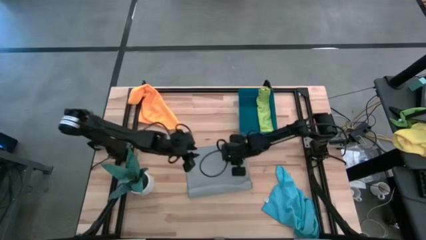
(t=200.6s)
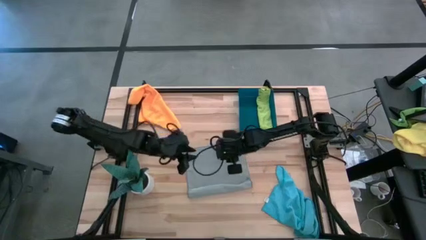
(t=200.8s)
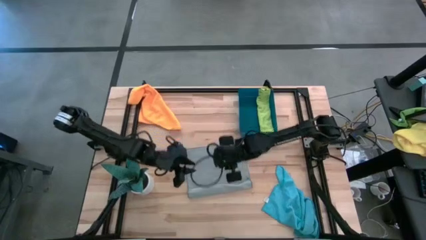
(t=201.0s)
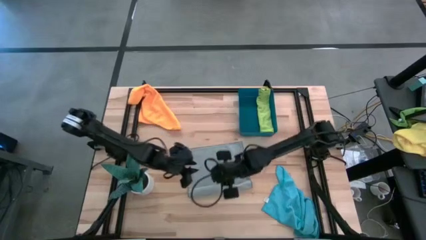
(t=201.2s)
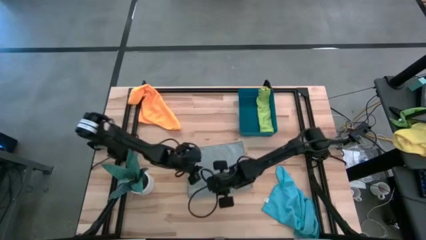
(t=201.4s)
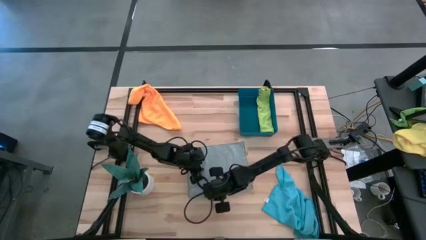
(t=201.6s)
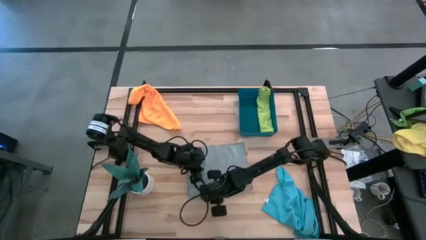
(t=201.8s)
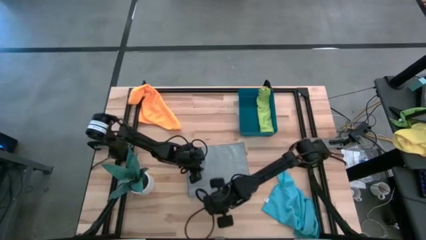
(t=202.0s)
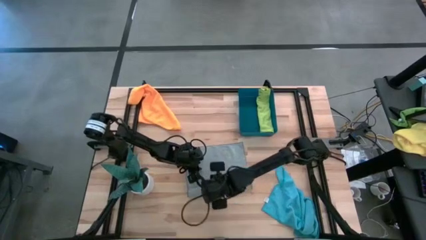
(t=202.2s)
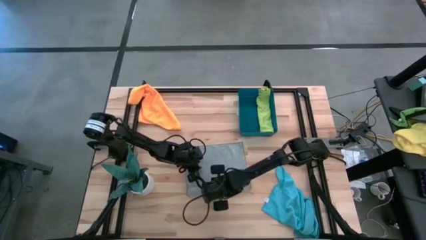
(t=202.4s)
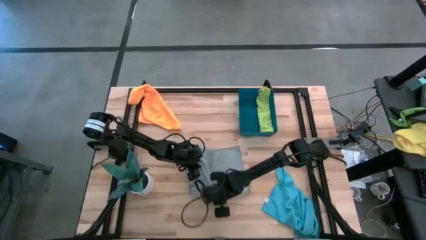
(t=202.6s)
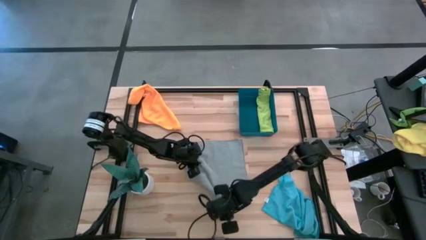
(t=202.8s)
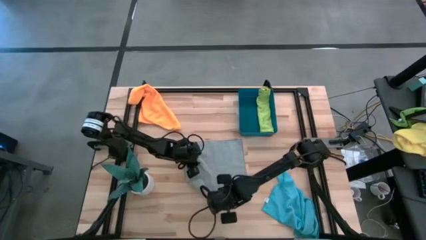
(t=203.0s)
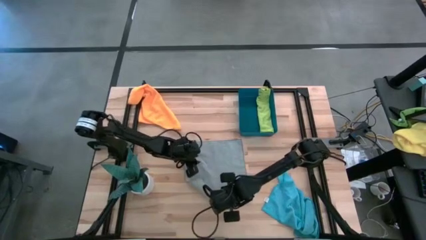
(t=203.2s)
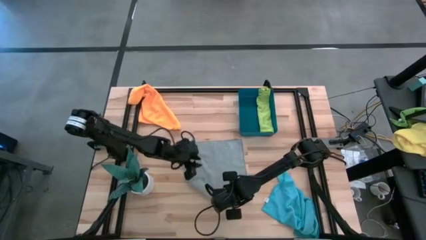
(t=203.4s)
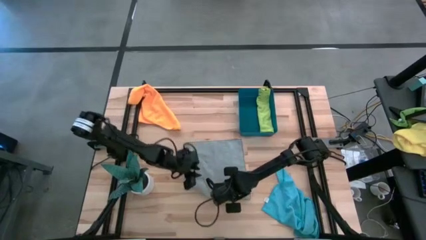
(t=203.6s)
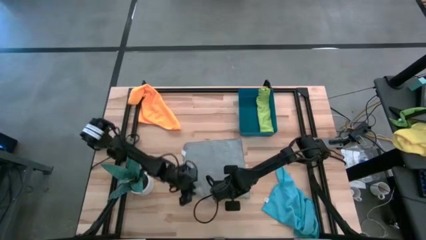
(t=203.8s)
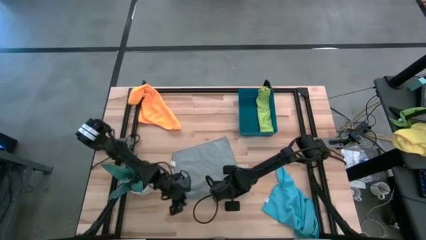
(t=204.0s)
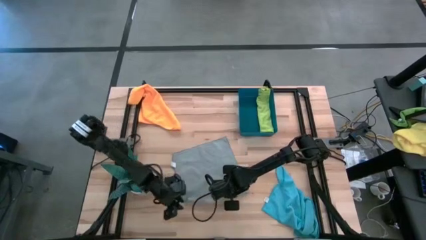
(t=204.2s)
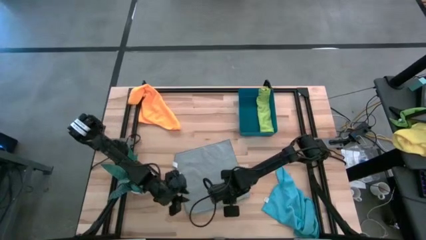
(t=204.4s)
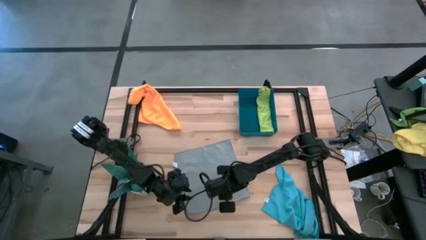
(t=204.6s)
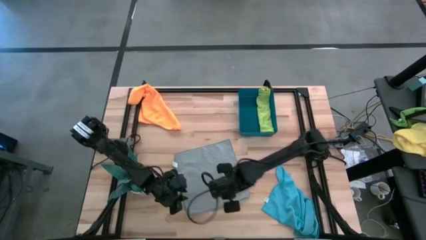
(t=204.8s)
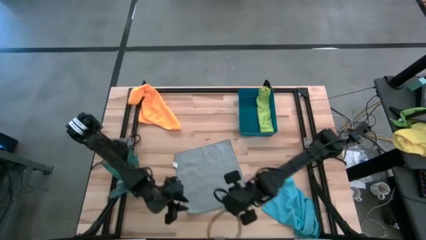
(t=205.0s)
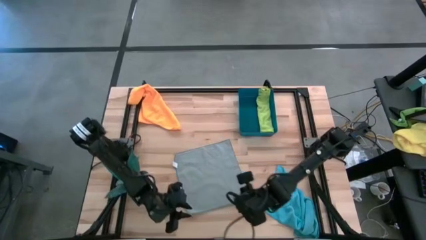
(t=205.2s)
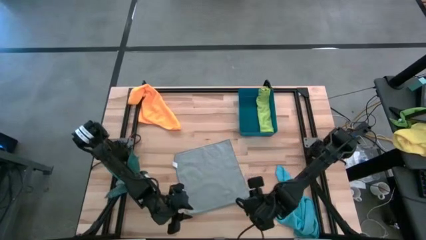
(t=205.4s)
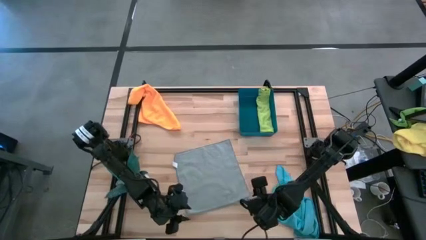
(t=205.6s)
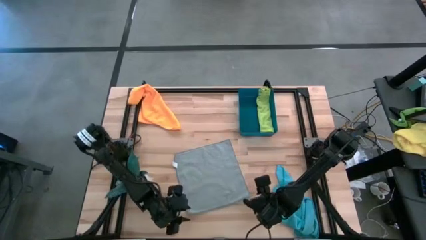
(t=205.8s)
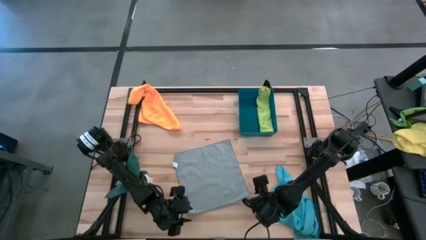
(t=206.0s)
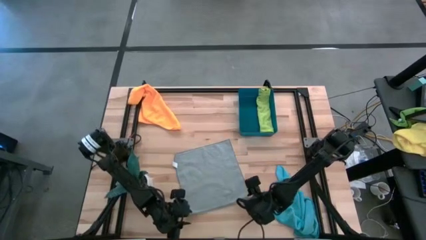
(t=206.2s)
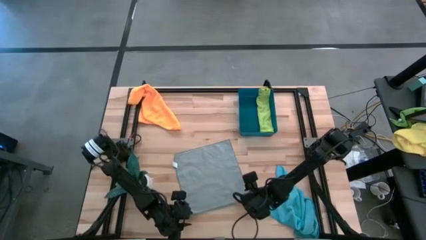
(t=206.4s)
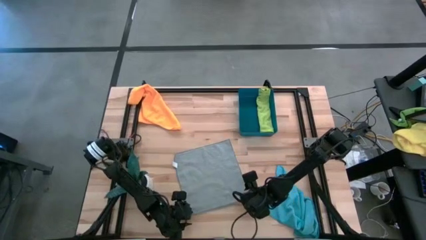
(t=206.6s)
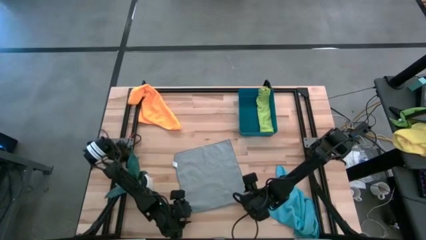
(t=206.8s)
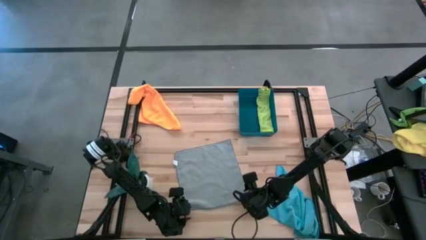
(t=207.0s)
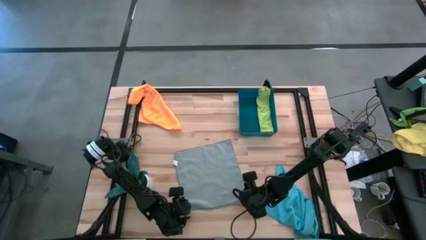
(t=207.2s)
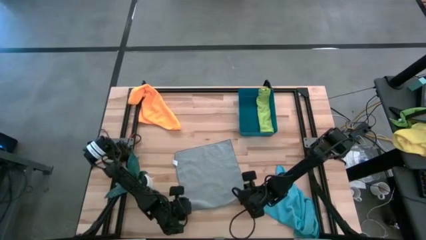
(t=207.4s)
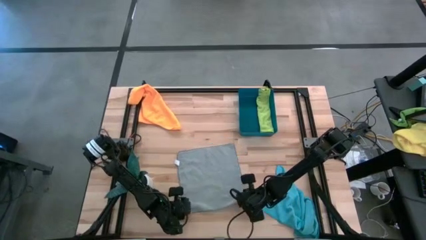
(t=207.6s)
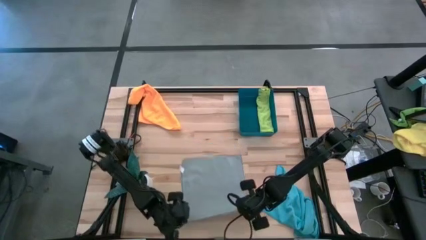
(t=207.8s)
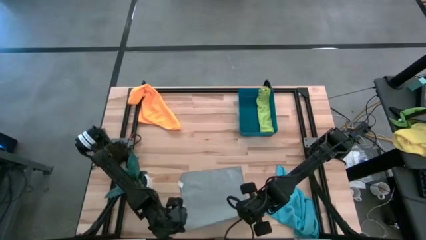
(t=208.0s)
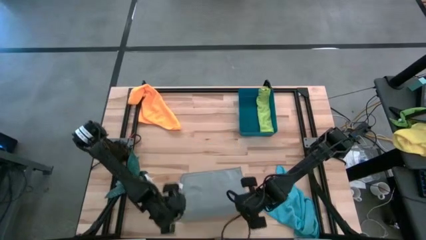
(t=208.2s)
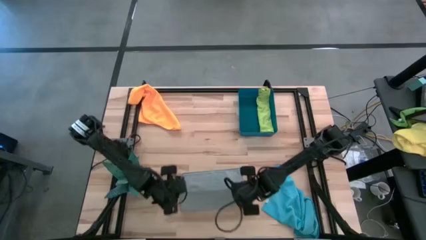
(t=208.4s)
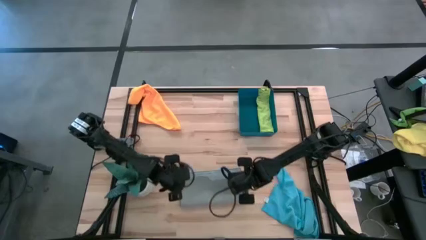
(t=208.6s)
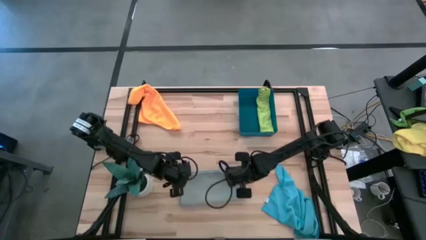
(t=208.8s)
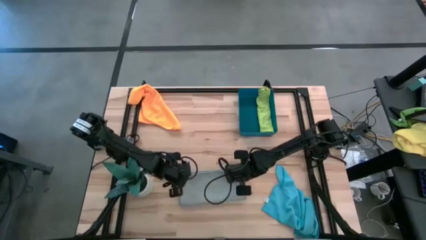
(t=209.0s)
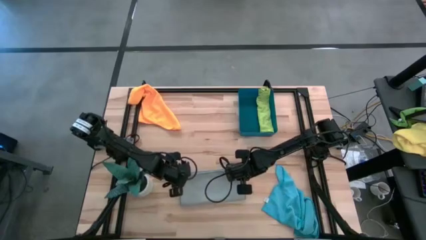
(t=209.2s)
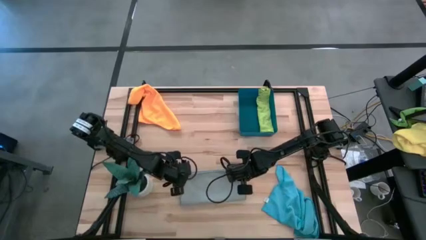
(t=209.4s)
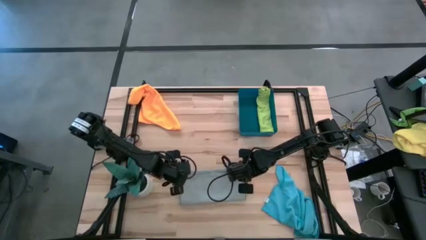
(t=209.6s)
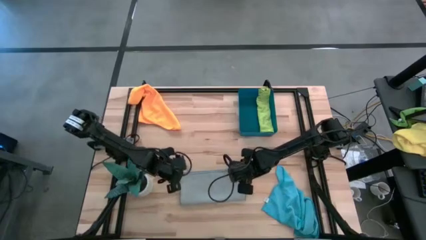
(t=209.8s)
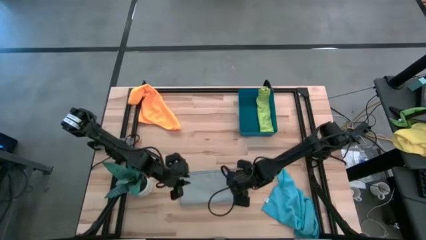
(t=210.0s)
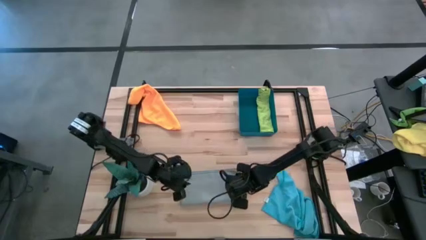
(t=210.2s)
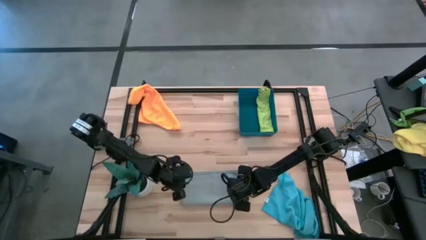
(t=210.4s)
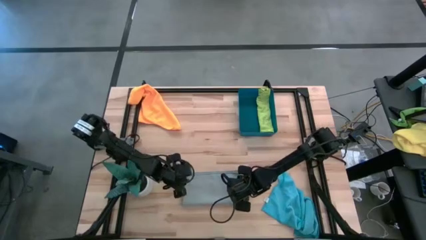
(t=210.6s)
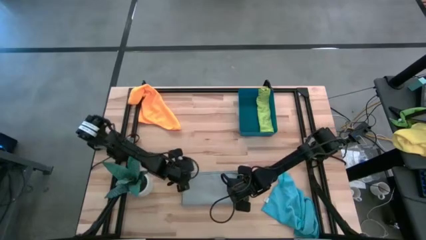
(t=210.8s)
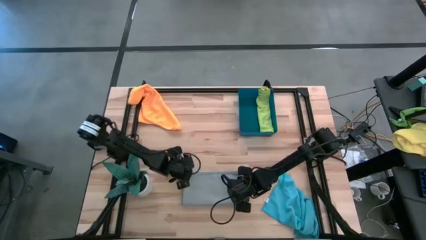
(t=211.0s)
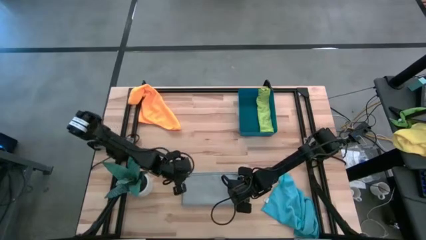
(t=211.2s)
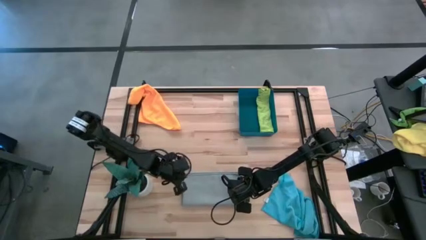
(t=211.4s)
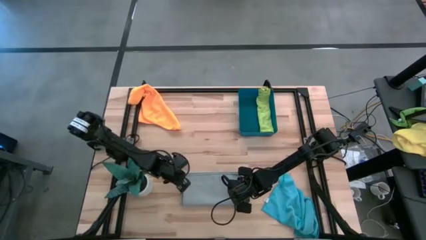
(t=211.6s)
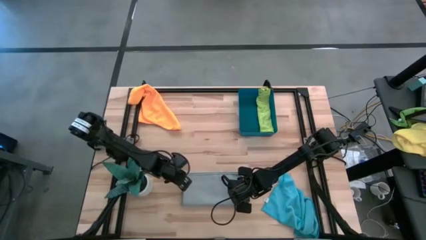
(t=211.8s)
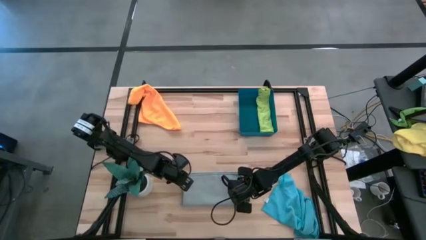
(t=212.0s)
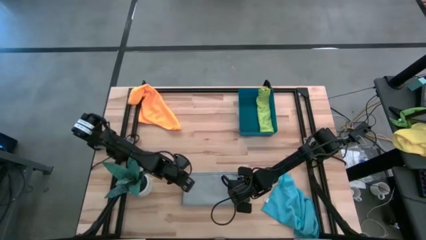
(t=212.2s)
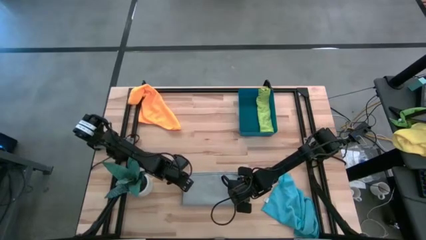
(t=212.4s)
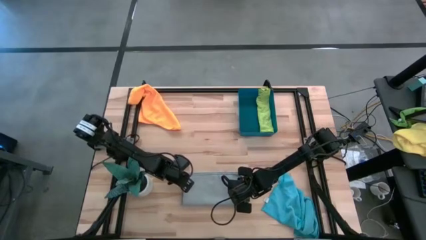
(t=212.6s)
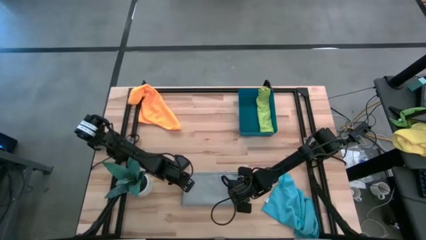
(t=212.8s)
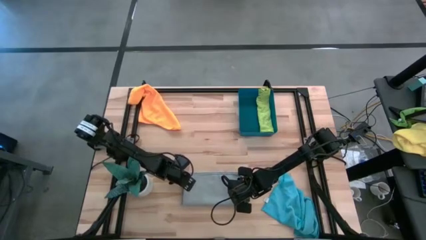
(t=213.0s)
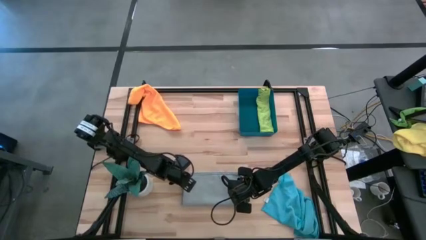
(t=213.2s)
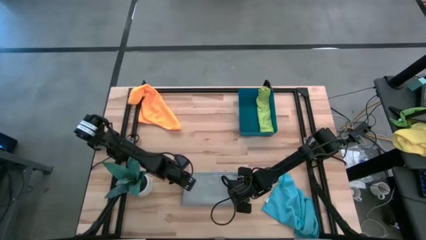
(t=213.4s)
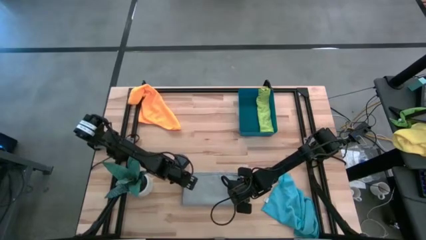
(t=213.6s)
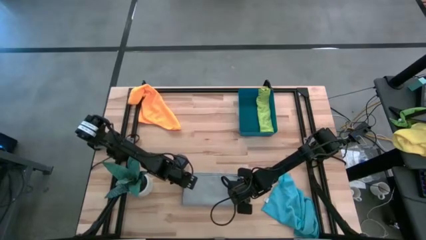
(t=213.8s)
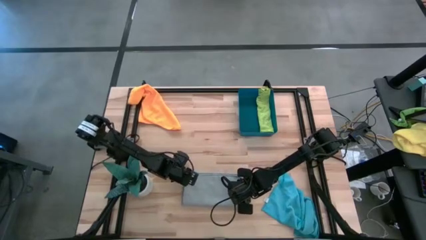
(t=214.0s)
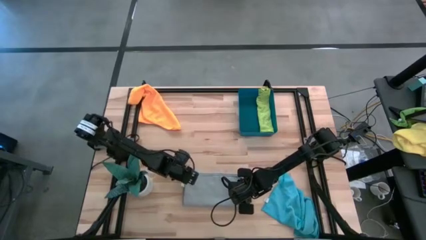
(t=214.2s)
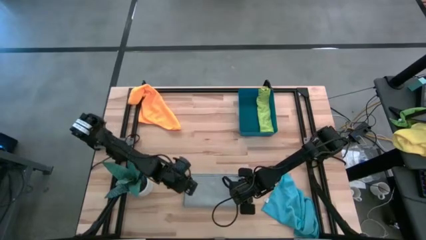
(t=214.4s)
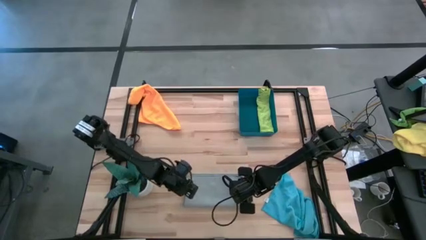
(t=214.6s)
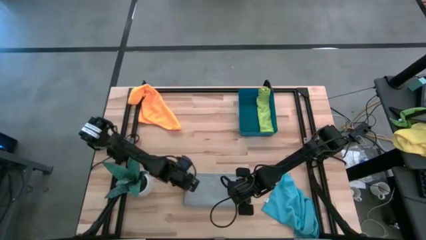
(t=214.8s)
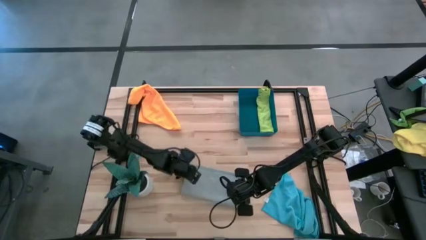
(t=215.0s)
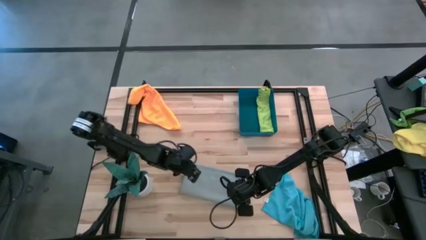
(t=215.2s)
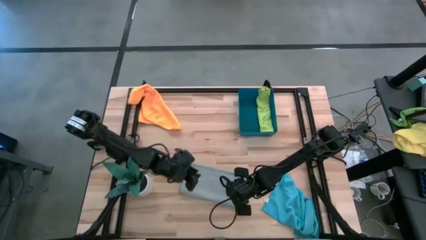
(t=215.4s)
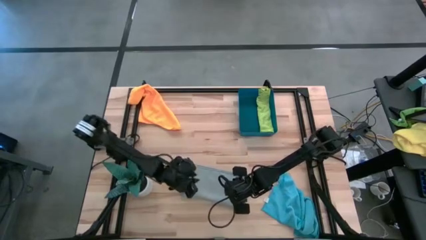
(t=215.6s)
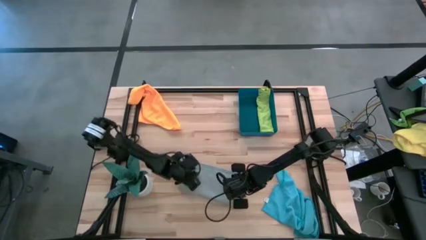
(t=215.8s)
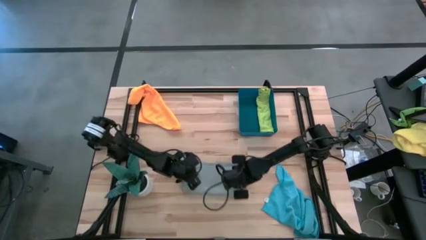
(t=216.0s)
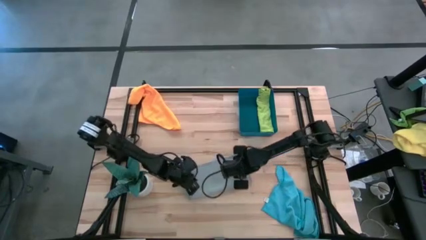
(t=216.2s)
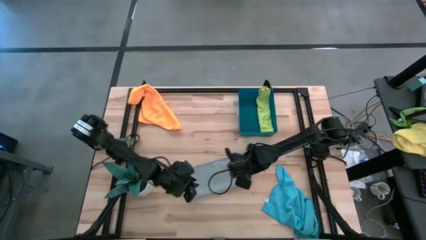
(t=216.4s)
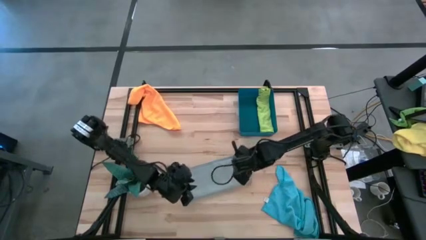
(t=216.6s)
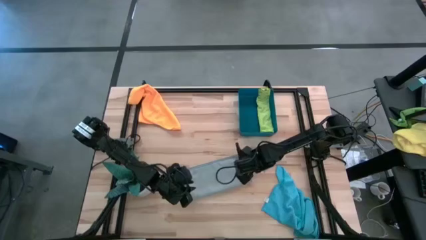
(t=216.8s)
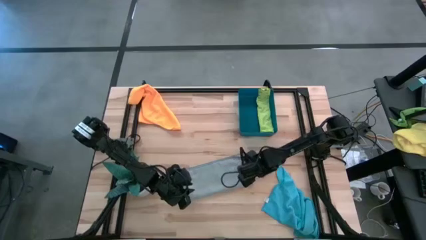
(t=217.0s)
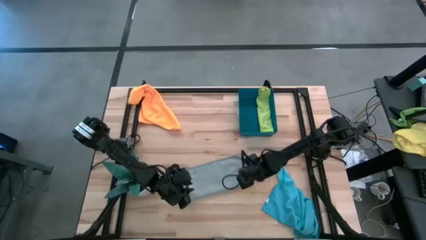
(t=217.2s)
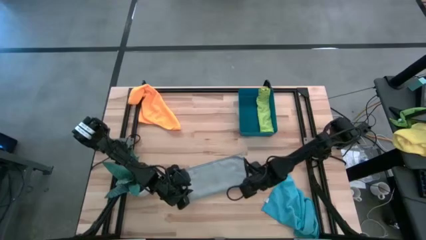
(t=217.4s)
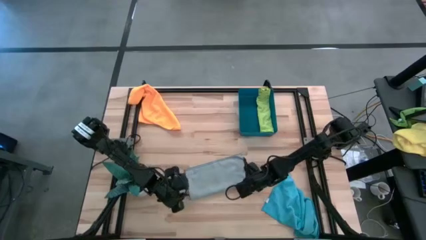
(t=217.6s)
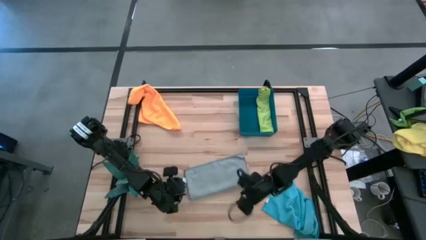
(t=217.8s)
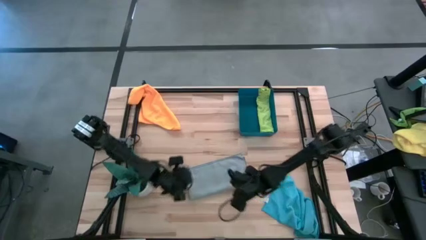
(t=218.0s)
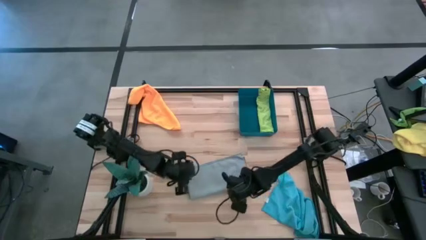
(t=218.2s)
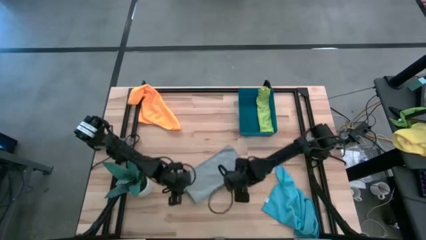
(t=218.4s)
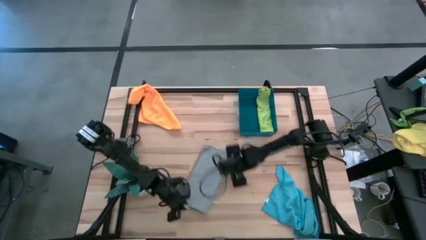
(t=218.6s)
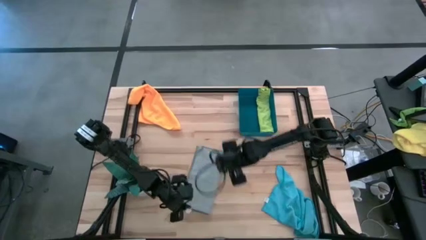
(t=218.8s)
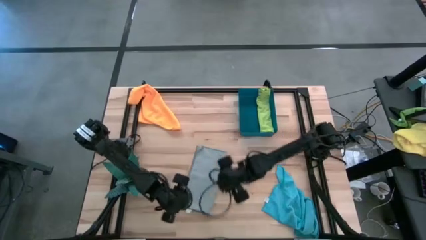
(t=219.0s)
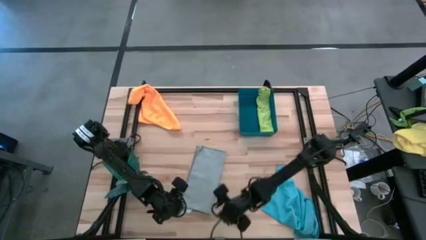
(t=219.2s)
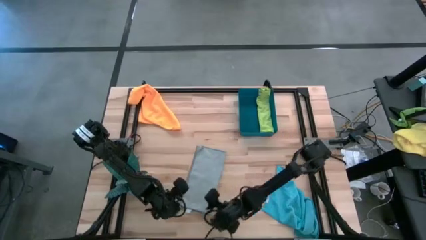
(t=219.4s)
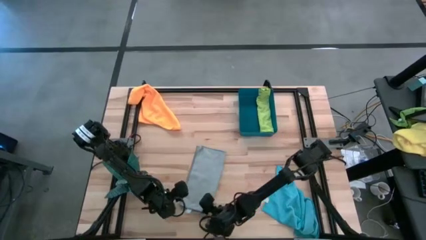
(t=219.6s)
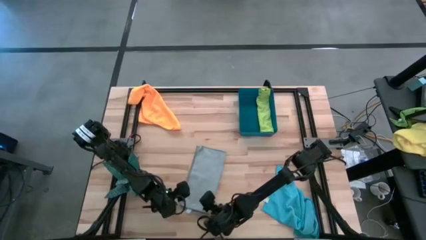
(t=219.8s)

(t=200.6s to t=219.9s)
Task: Roll microfiber towels into tight, uniform cylinder then place into a basket
Roll the gray towel
